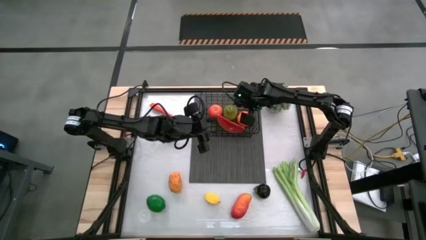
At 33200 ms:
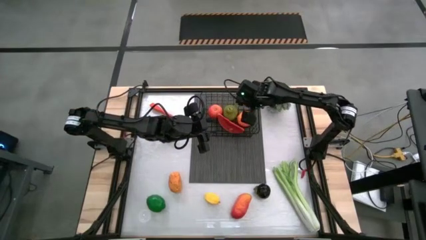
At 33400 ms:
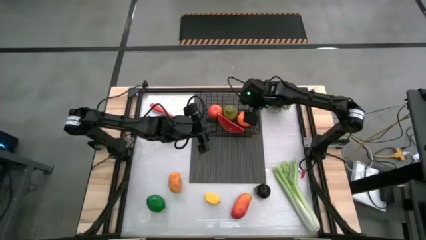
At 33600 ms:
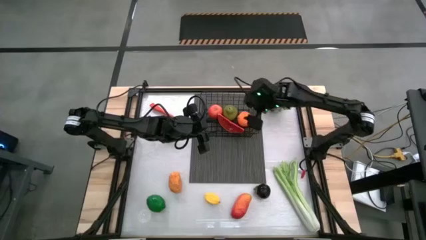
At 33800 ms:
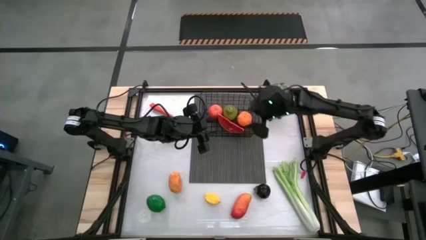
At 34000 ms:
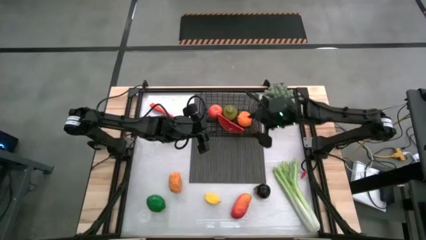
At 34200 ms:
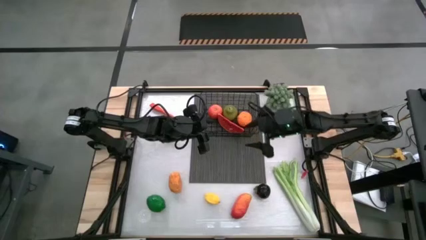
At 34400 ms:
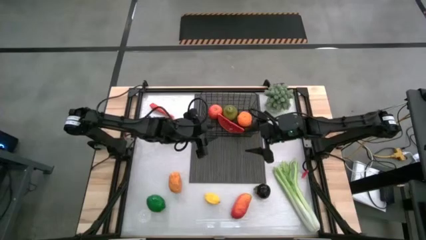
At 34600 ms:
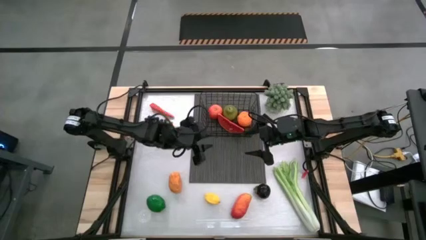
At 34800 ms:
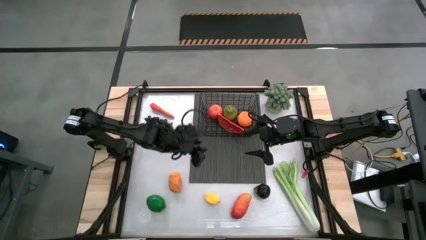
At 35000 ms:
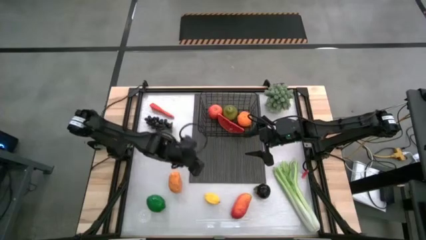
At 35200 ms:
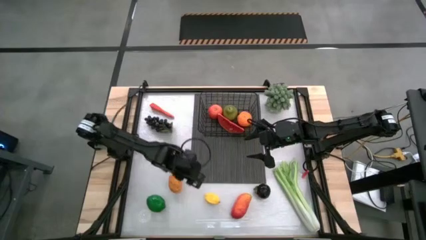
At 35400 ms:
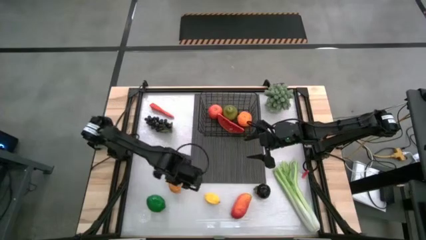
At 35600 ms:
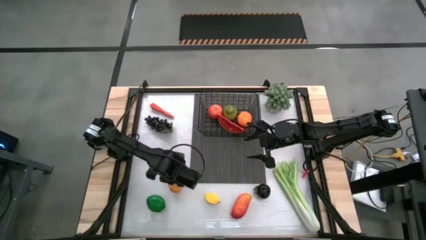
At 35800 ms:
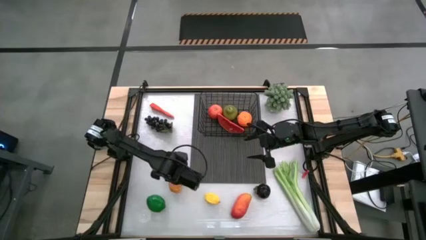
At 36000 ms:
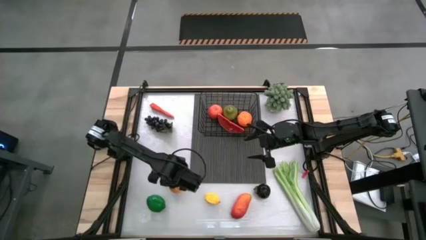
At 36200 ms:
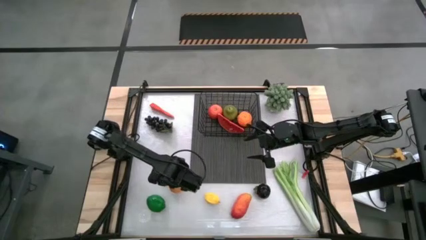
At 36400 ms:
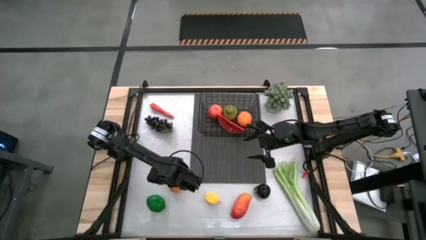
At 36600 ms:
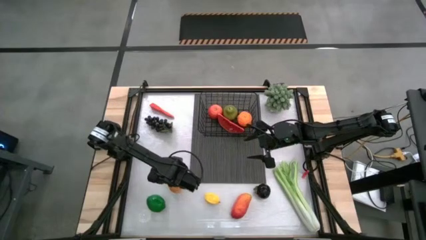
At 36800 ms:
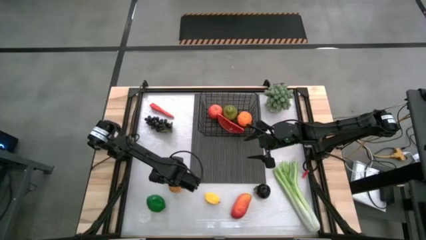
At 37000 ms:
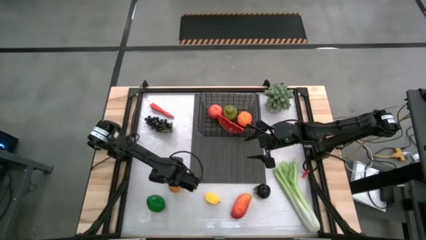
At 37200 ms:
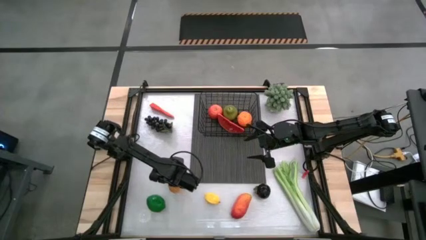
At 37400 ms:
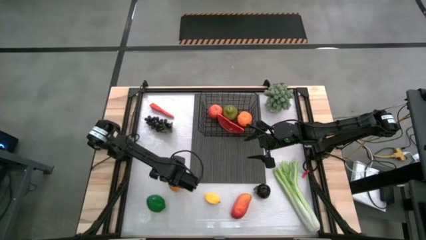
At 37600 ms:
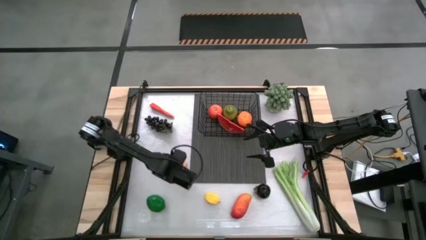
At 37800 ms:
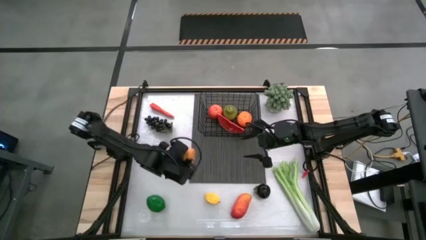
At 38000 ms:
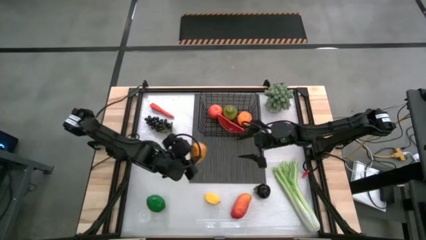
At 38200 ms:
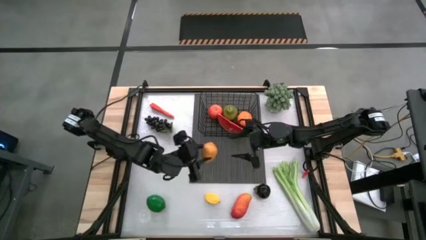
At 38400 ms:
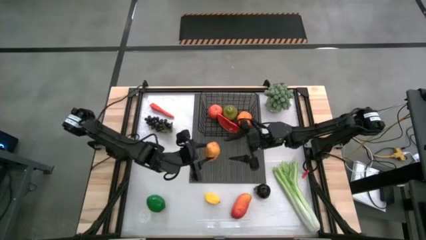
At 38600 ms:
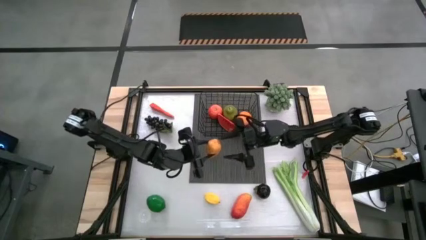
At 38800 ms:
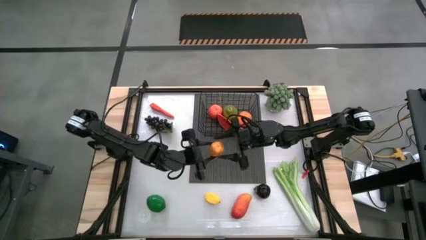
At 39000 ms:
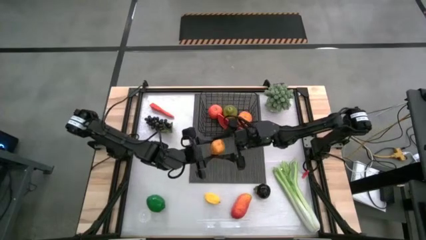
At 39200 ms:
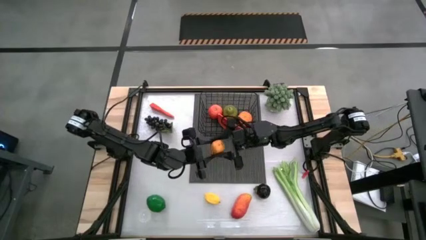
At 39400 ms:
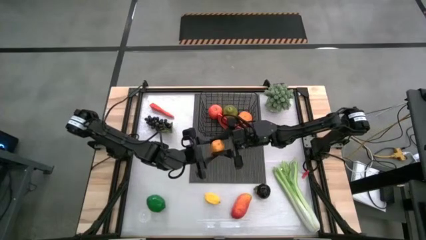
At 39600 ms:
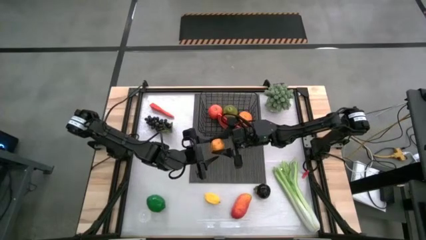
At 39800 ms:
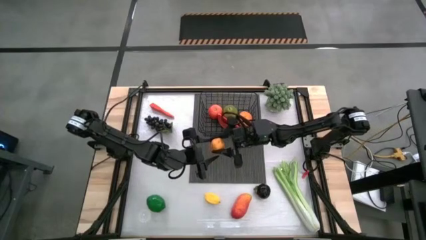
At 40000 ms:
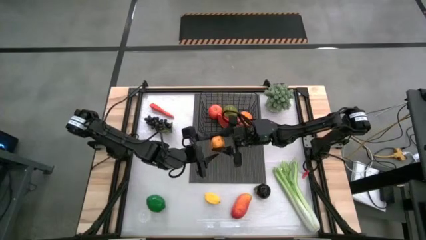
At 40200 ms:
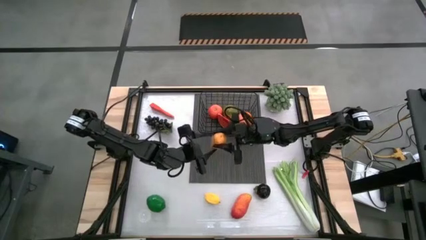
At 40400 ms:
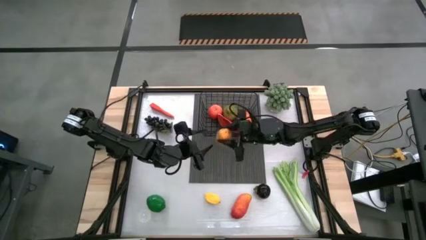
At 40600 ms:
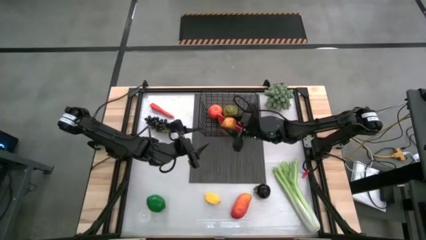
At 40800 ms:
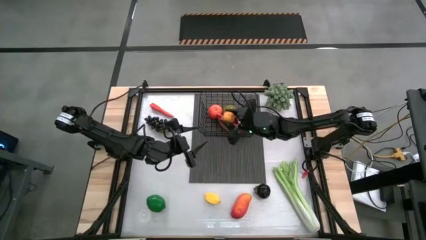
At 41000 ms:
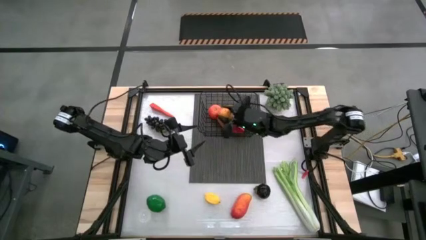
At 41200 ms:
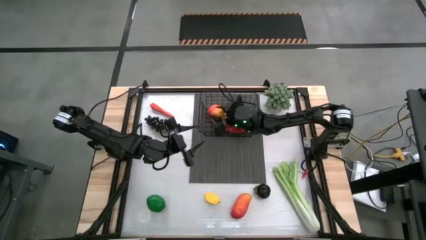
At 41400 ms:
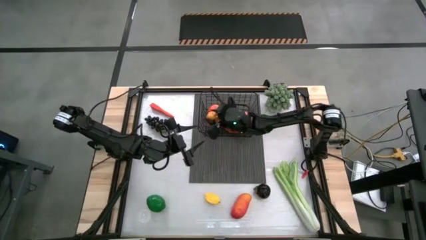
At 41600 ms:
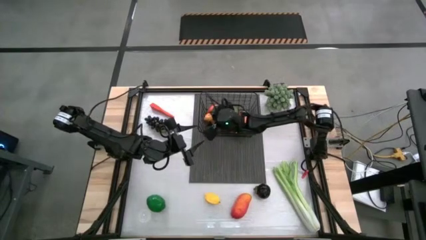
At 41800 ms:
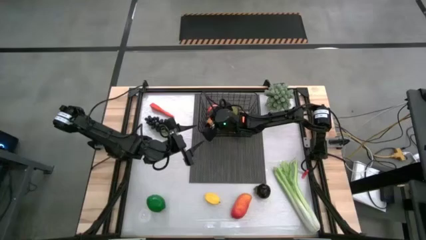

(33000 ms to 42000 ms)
Task: Build produce basket
Put the top mango into the wire basket

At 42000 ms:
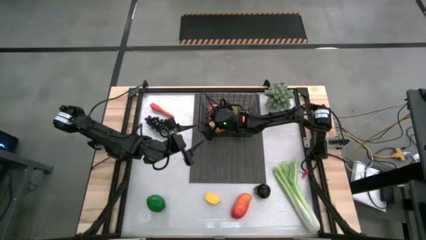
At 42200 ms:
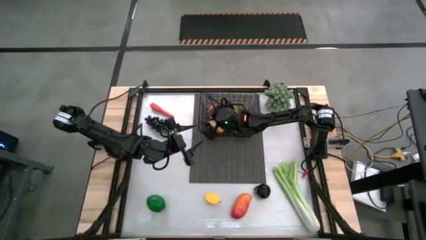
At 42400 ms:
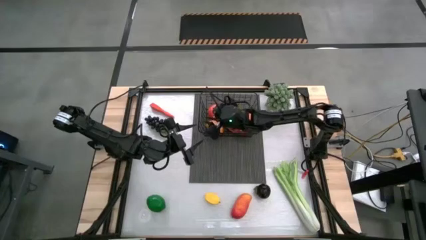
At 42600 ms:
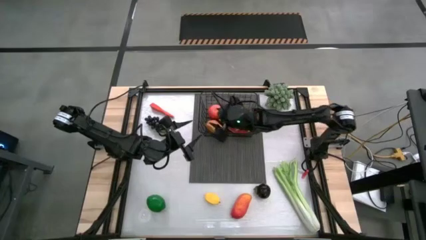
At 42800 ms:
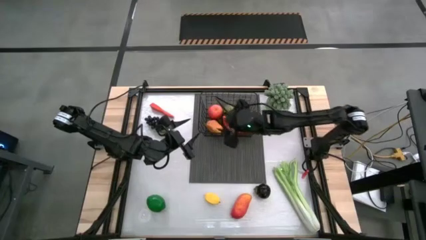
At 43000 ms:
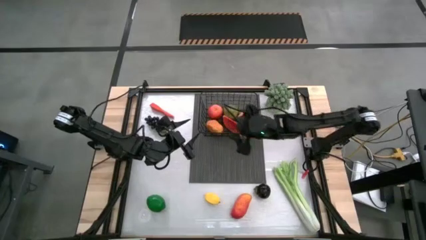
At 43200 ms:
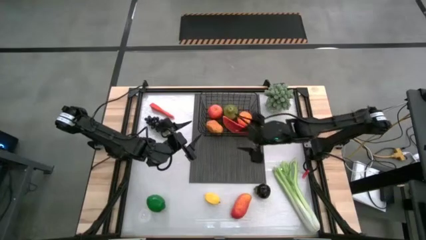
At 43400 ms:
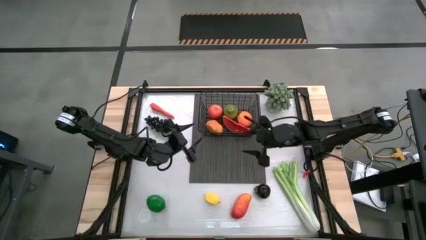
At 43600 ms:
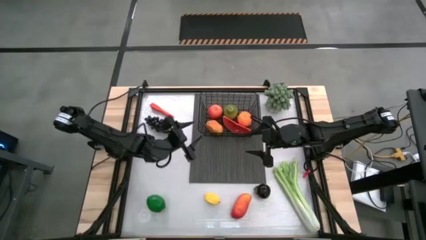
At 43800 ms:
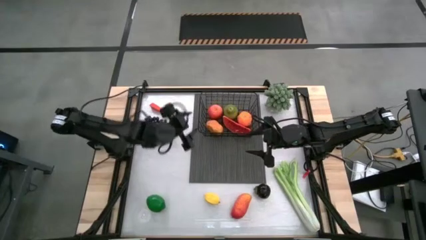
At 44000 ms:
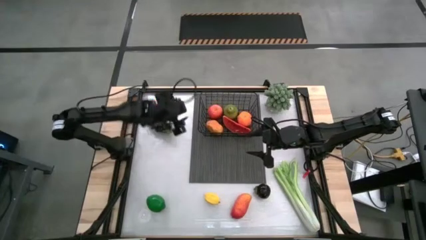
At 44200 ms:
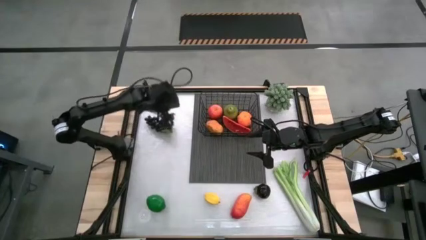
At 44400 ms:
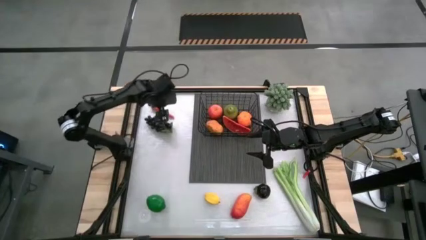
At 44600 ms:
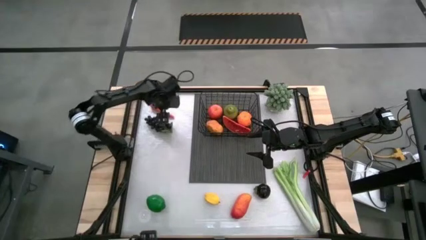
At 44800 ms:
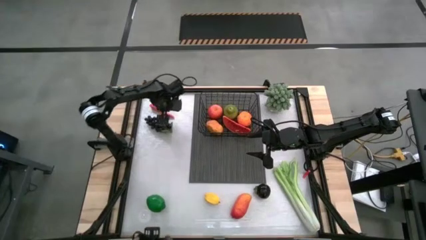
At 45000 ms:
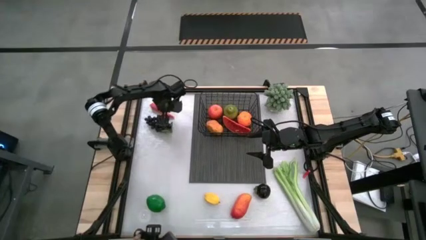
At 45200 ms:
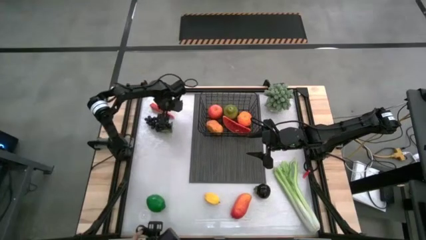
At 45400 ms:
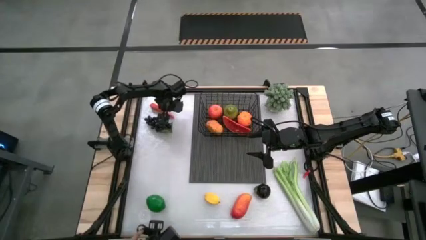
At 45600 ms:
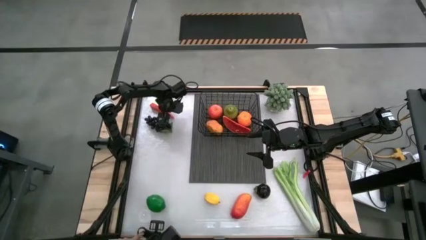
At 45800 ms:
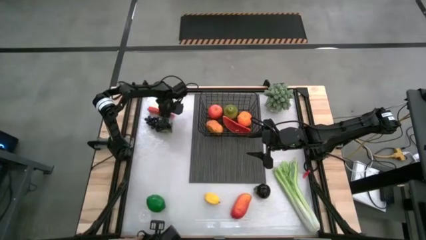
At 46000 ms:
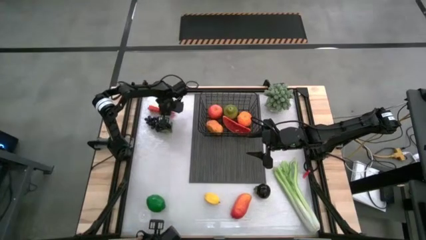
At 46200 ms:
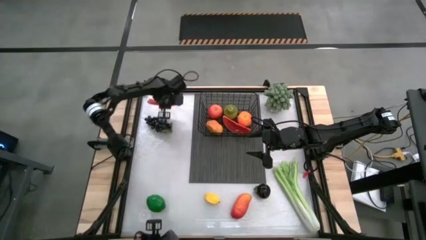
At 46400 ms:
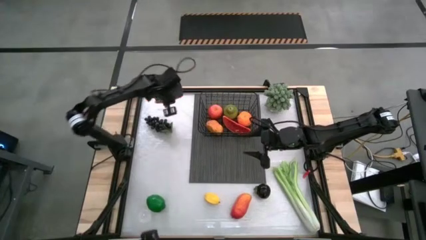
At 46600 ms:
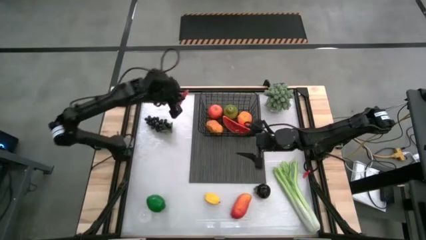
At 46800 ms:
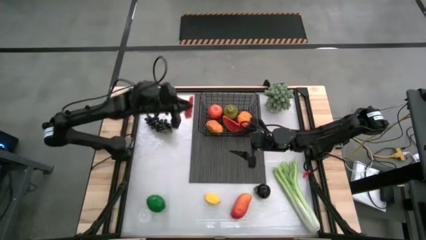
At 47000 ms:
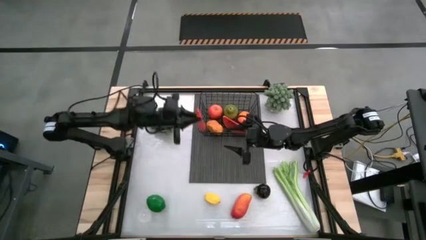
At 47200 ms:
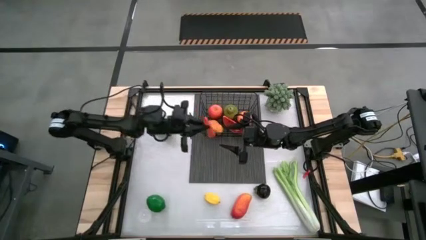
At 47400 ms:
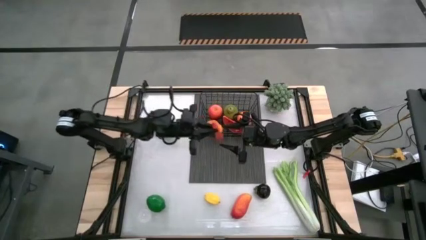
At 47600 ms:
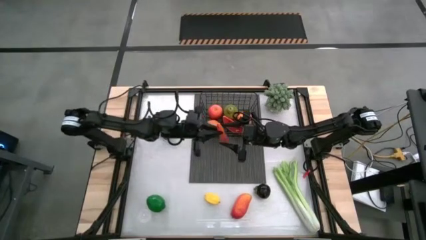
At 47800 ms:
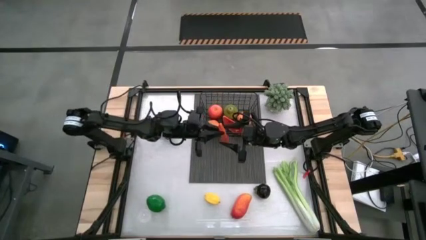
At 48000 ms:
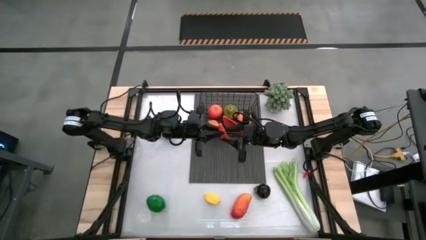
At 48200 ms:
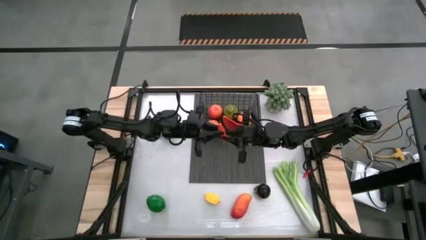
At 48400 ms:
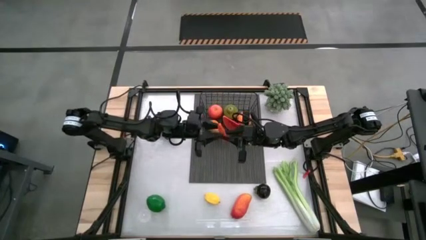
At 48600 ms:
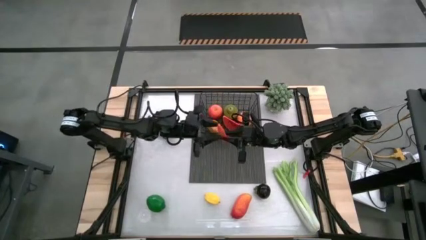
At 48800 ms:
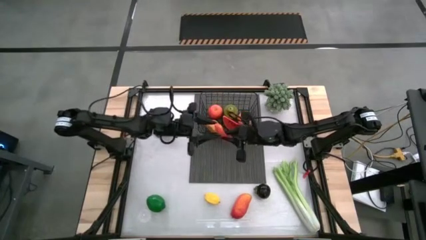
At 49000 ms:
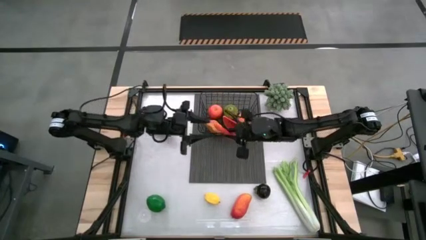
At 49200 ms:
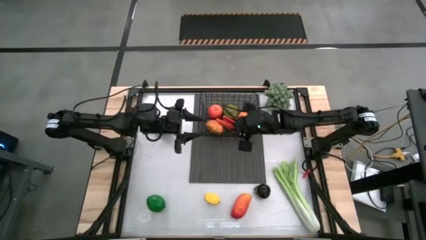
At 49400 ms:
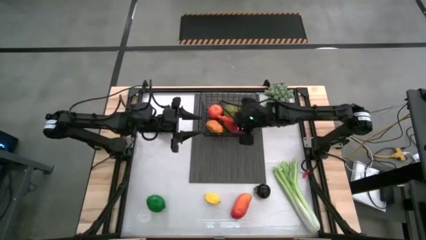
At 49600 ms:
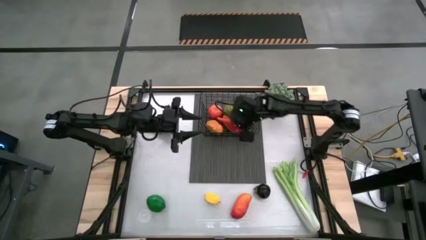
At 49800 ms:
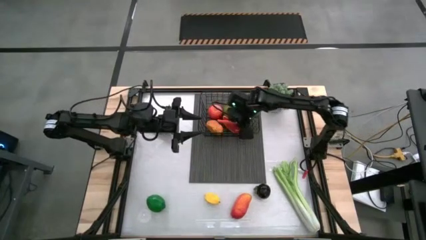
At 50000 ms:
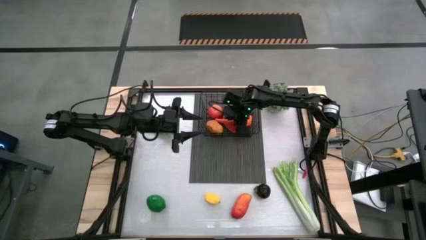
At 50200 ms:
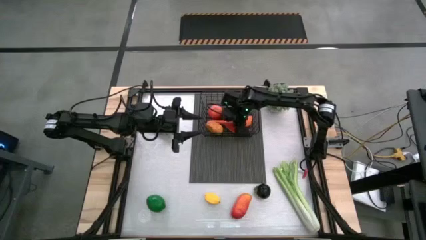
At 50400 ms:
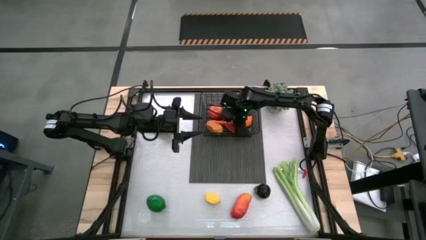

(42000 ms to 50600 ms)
Put the carrot into the wire basket
